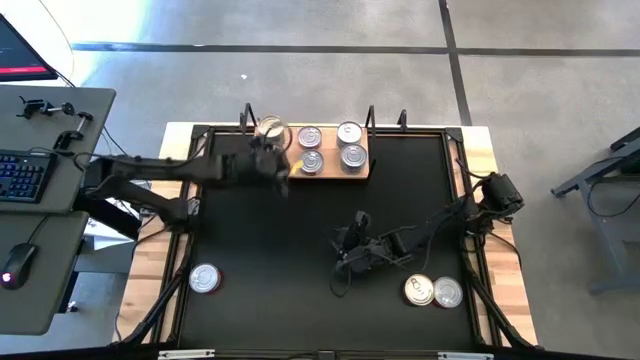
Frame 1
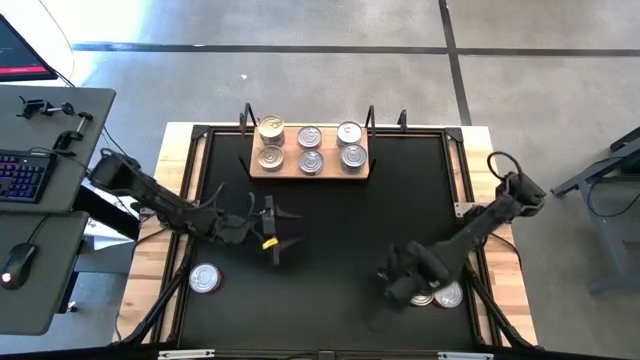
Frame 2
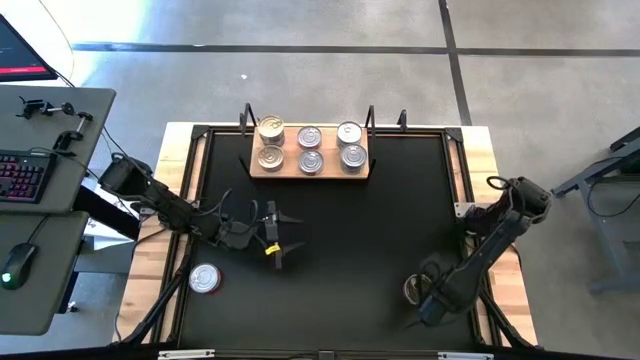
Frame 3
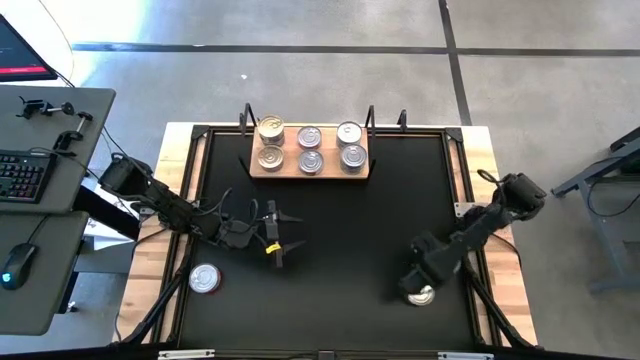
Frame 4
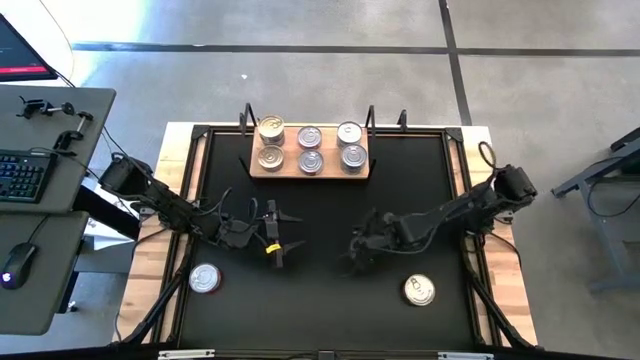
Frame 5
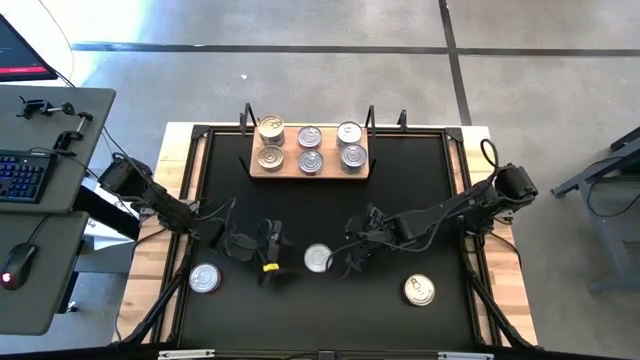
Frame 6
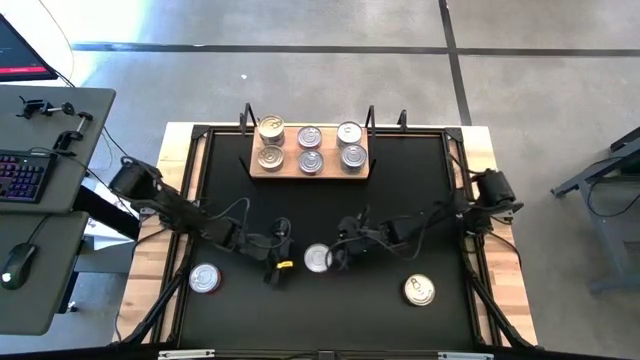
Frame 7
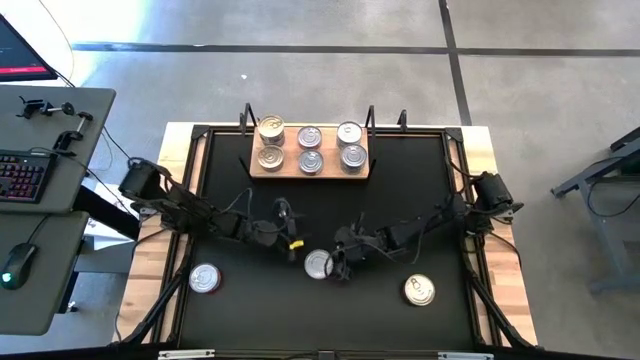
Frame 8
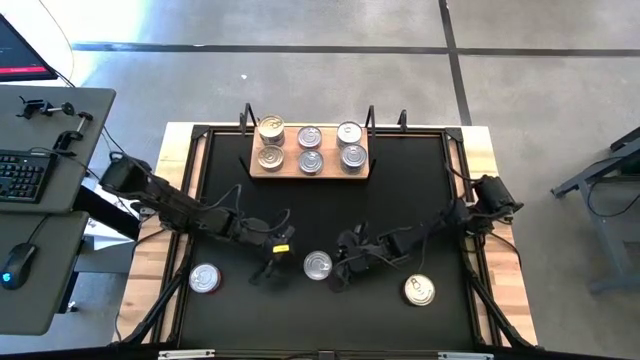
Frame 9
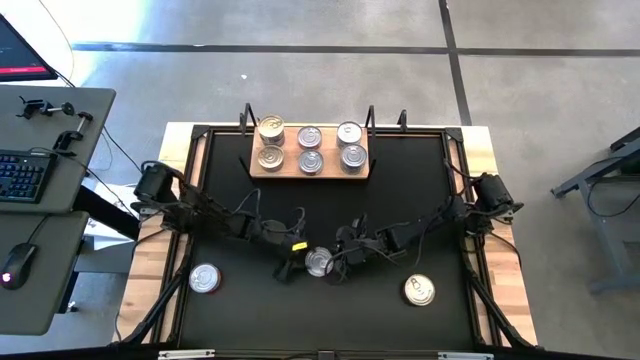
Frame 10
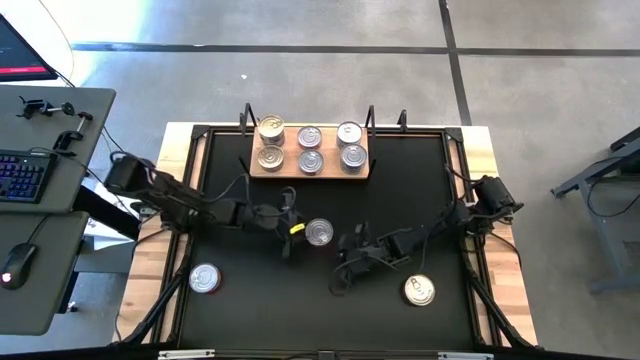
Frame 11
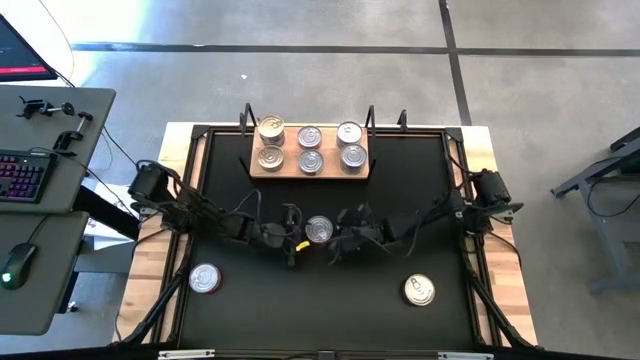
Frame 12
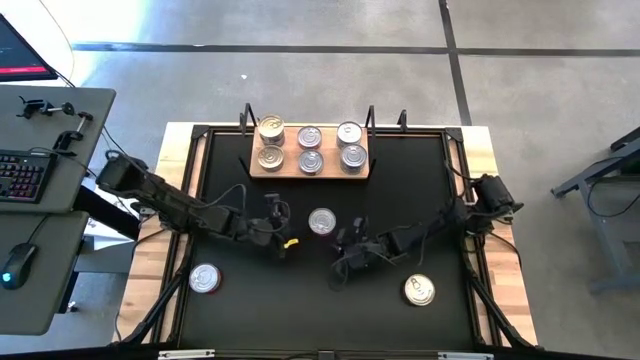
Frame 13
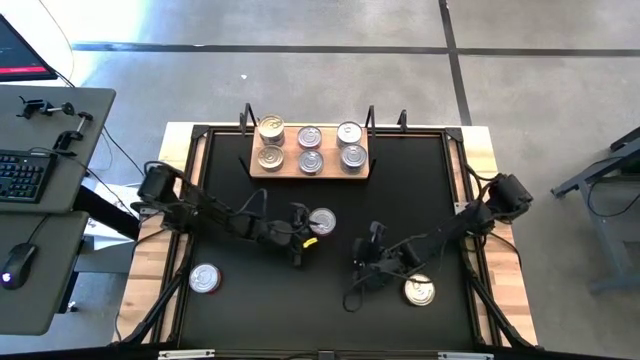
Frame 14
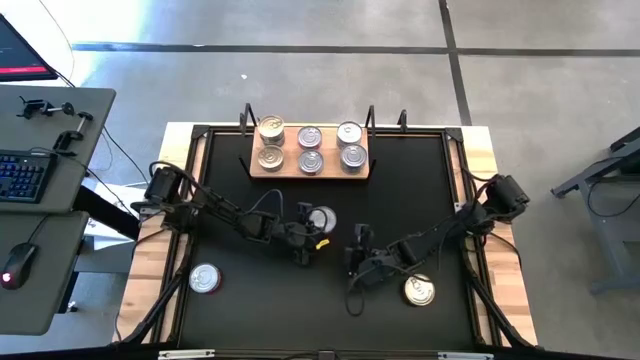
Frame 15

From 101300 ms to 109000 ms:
Task: Stack canned seafood by type on shelf
Stack the red tuna can on top of the other red tuna can on the shelf

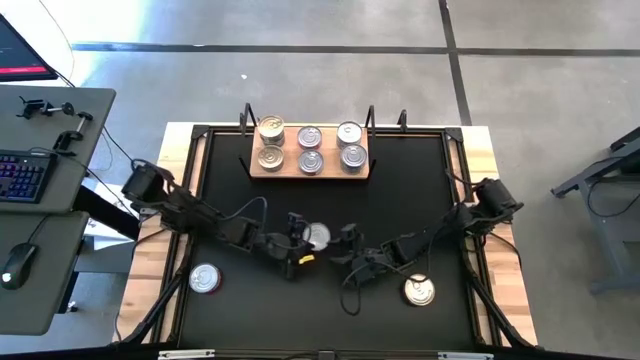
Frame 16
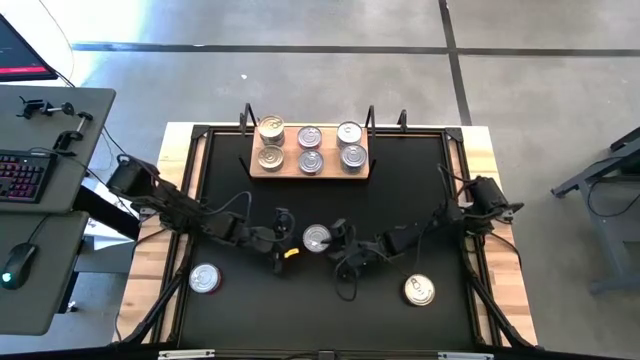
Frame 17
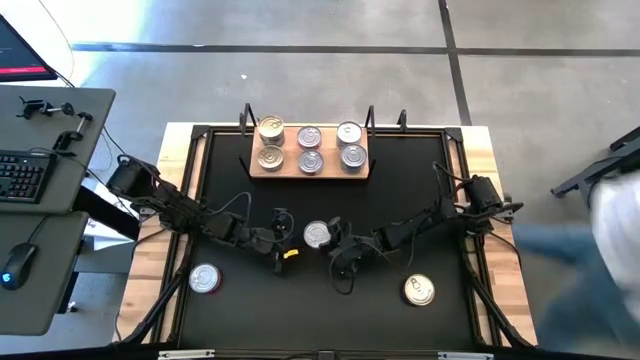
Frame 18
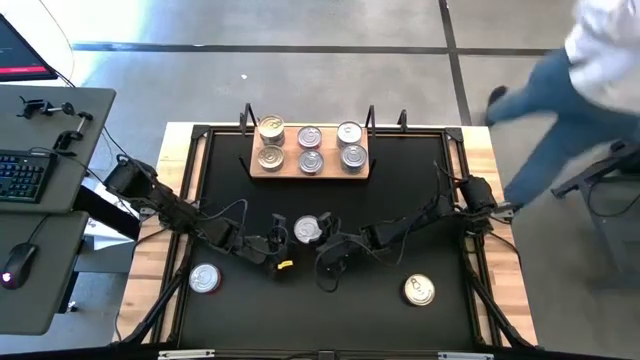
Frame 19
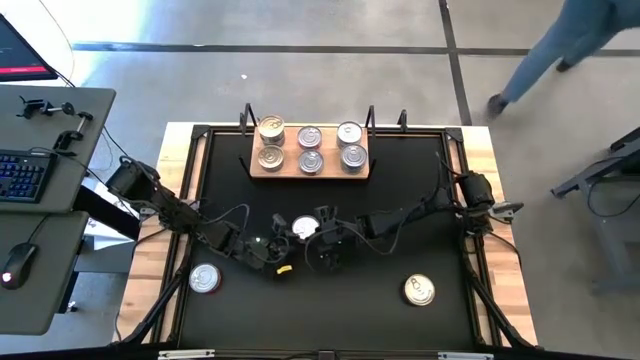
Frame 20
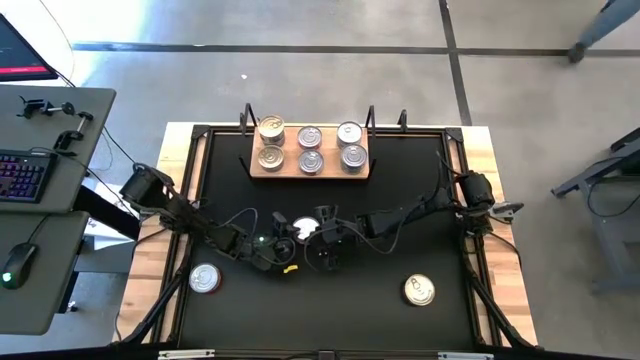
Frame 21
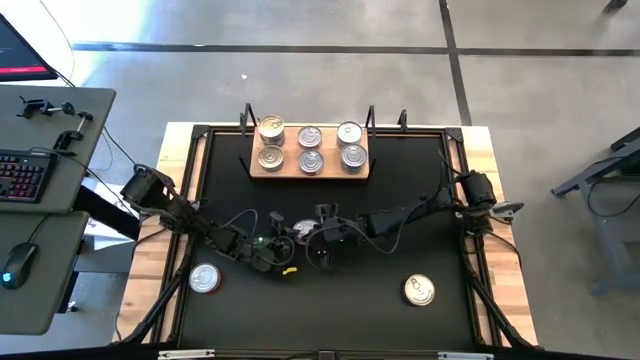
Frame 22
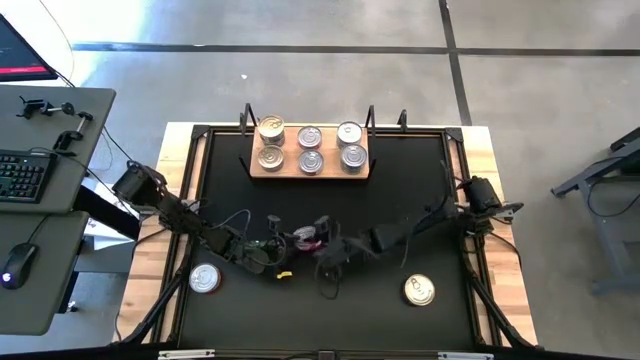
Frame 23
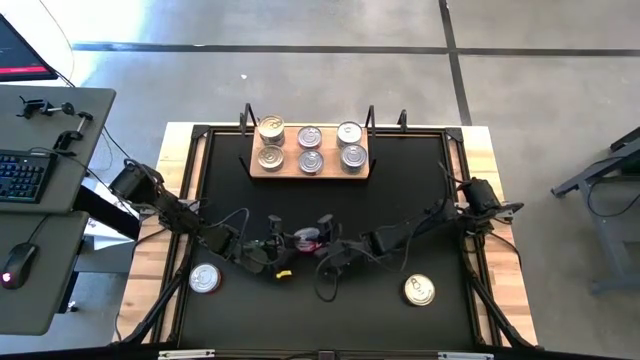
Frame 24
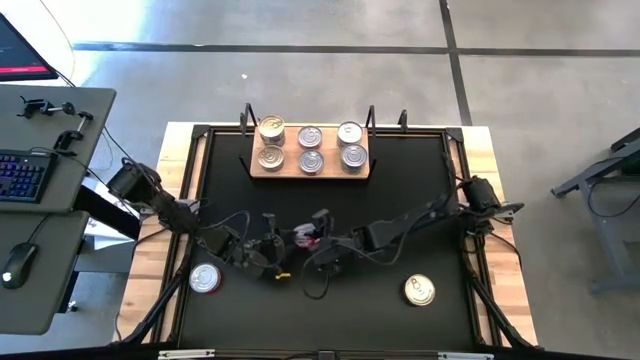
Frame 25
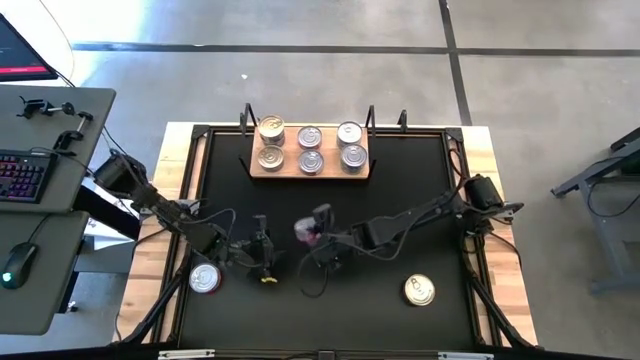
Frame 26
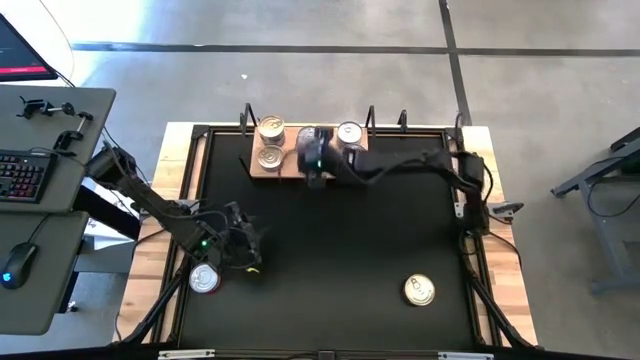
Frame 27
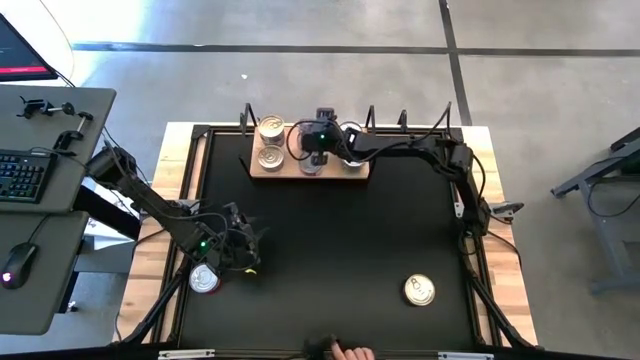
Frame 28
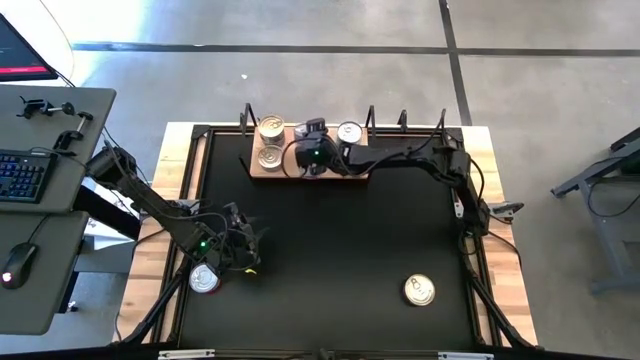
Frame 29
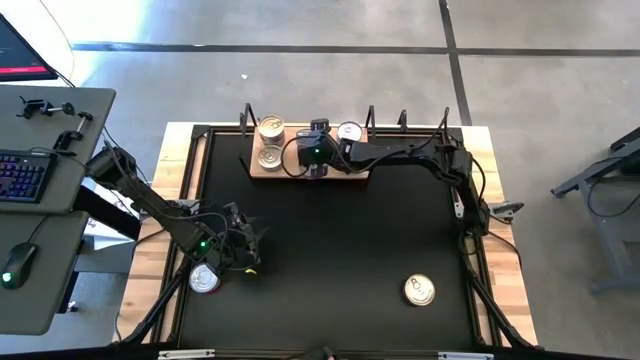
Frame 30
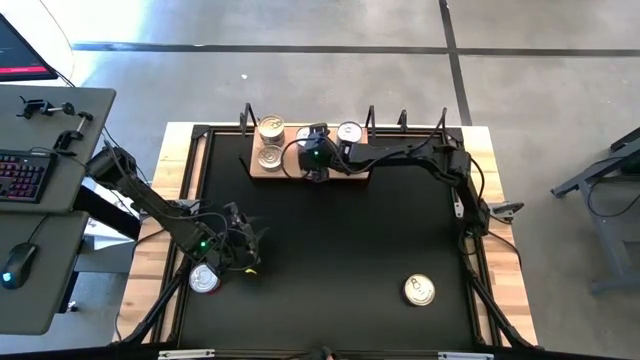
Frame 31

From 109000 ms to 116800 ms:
Stack the red tuna can on top of the other red tuna can on the shelf

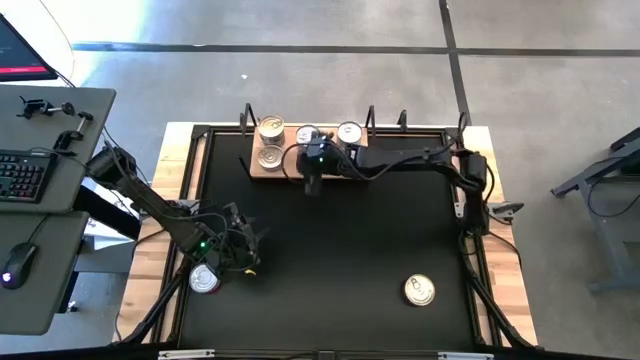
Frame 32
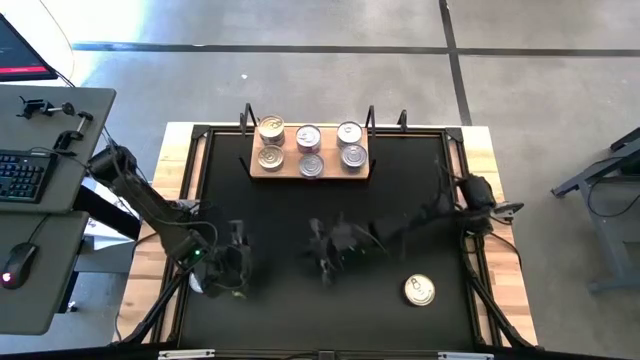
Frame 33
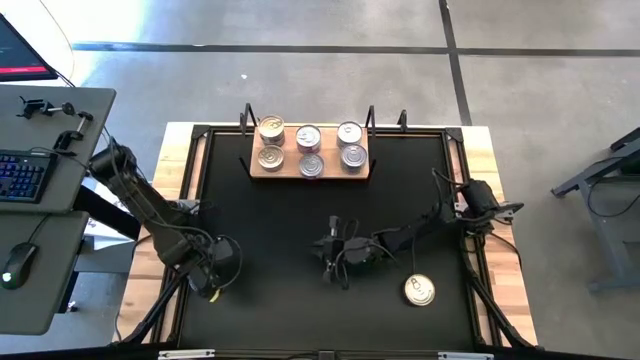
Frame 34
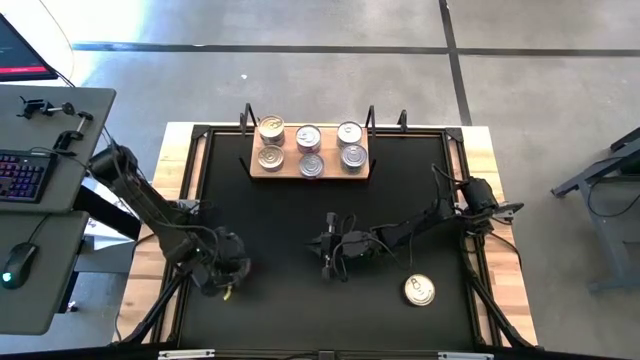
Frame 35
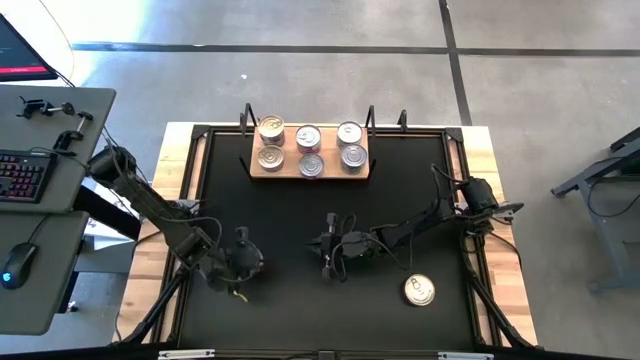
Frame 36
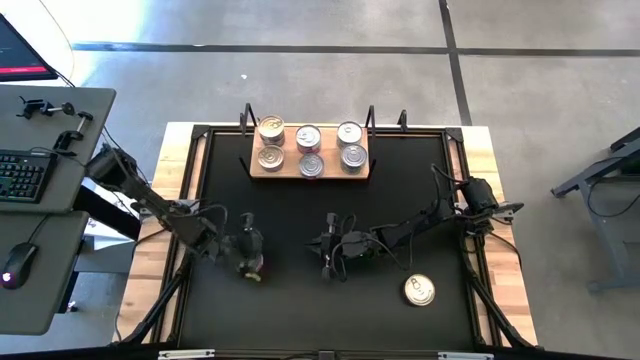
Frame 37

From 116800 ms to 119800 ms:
Stack the red tuna can on top of the other red tuna can on the shelf

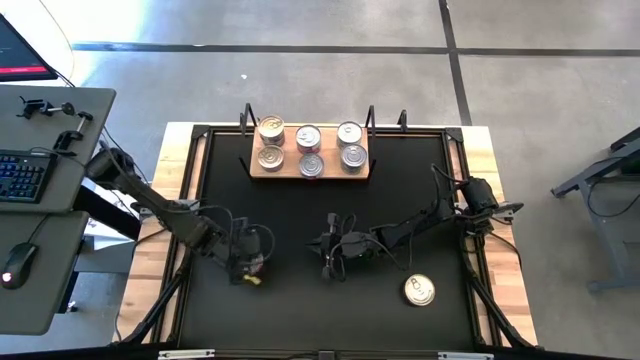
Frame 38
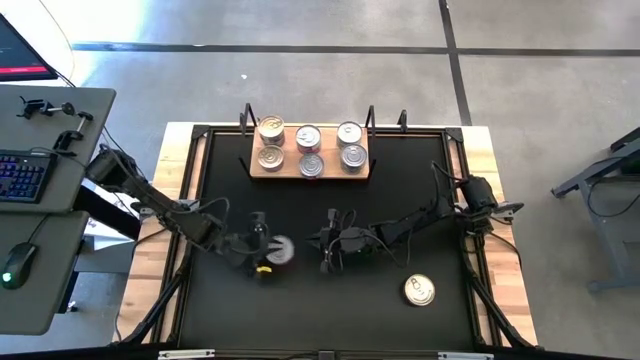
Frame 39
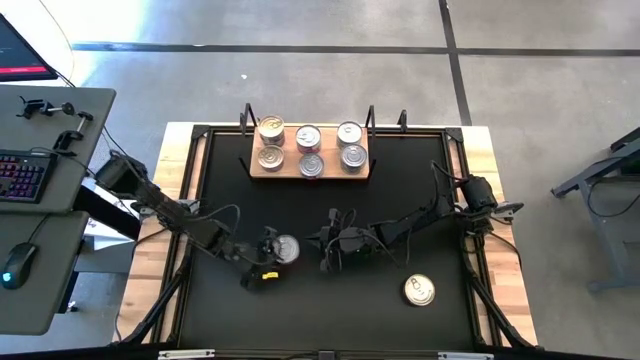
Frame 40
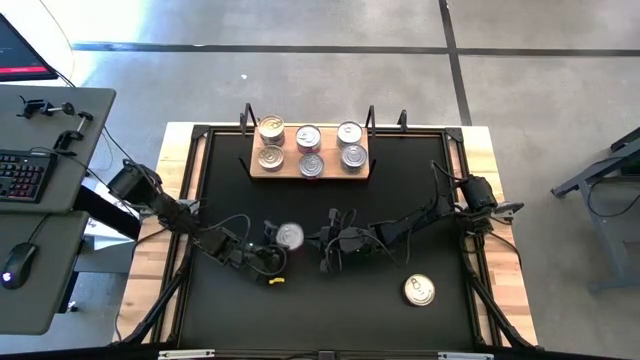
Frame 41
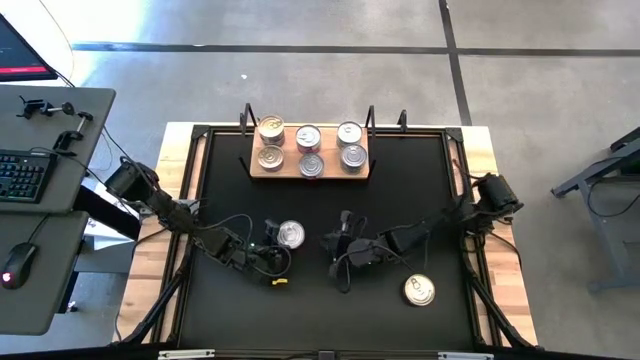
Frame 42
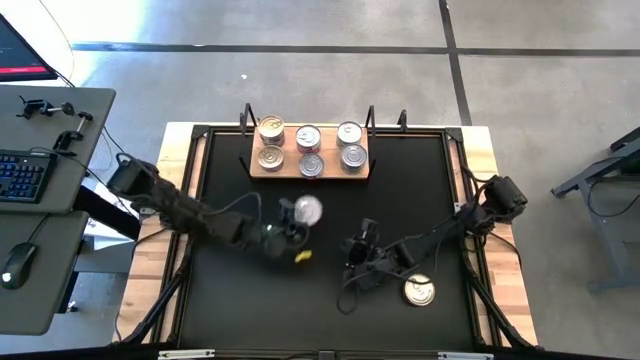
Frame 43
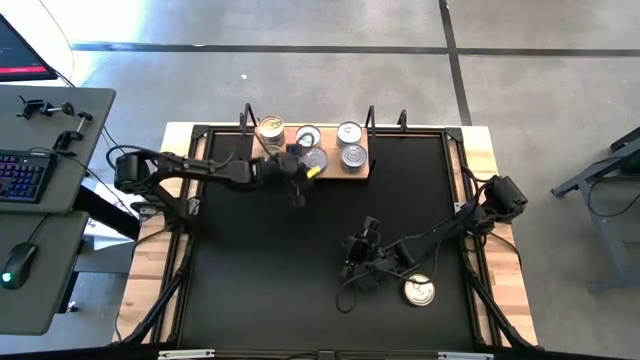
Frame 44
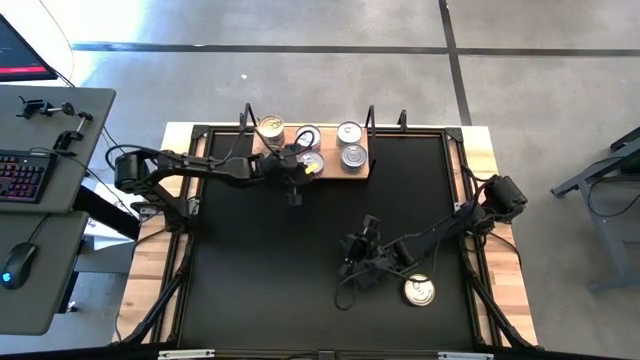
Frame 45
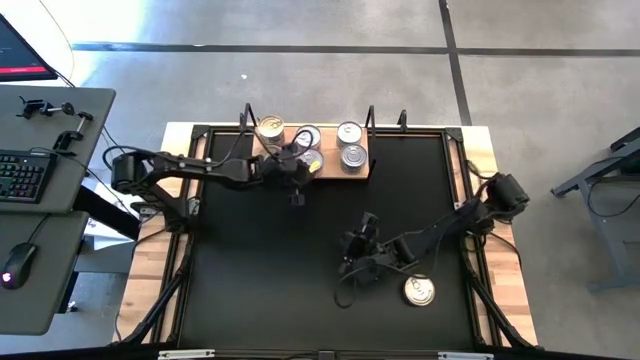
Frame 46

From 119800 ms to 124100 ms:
Stack the red tuna can on top of the other red tuna can on the shelf
